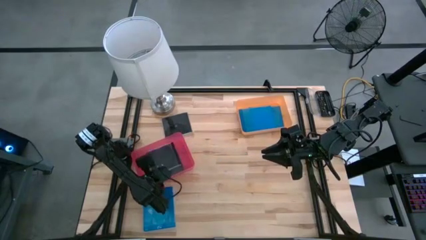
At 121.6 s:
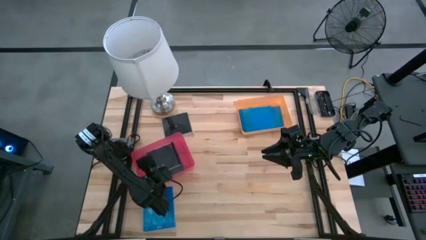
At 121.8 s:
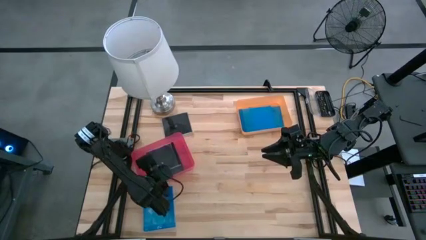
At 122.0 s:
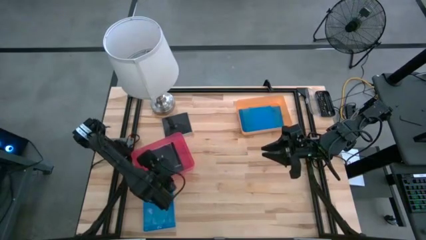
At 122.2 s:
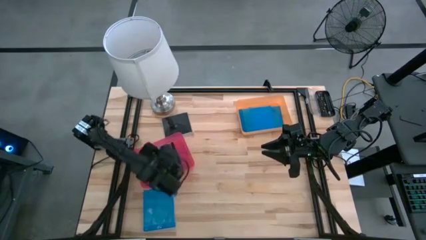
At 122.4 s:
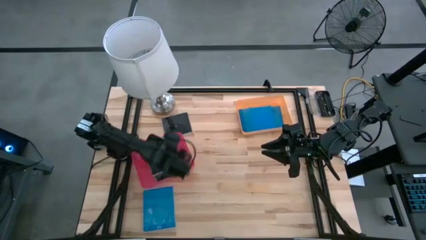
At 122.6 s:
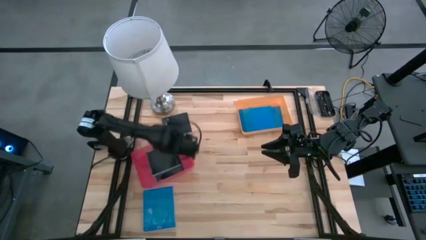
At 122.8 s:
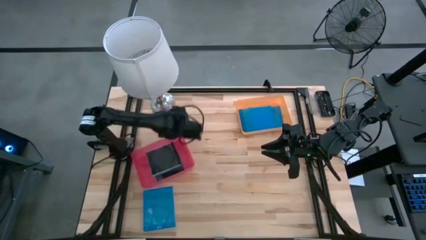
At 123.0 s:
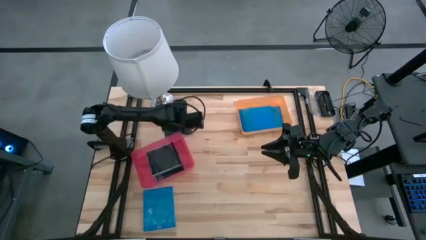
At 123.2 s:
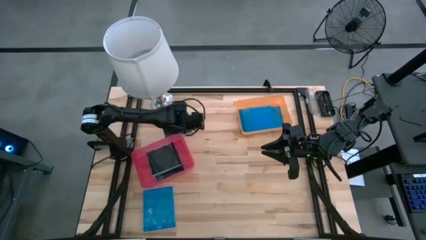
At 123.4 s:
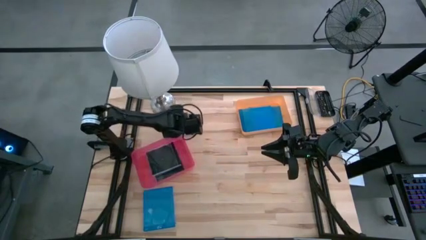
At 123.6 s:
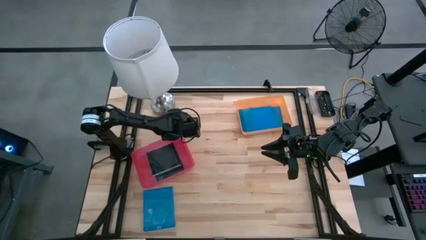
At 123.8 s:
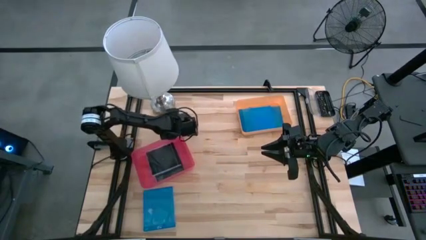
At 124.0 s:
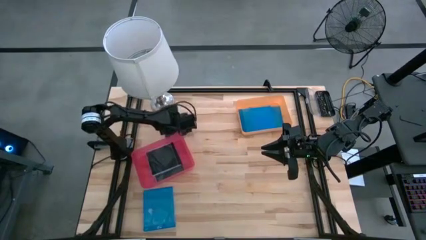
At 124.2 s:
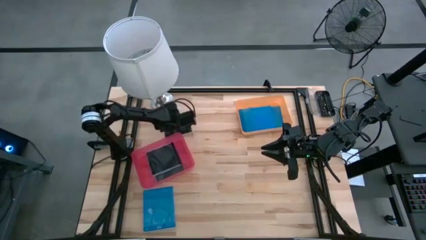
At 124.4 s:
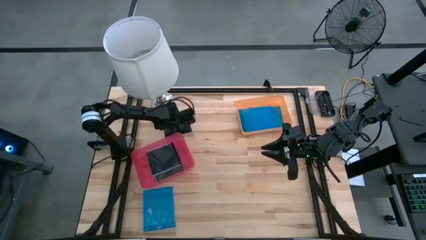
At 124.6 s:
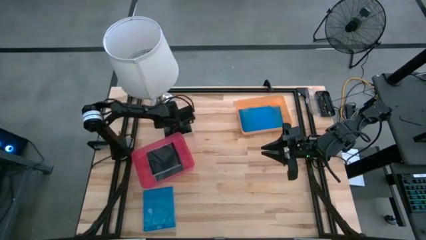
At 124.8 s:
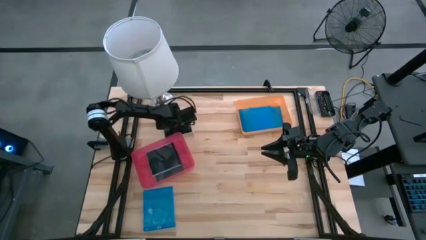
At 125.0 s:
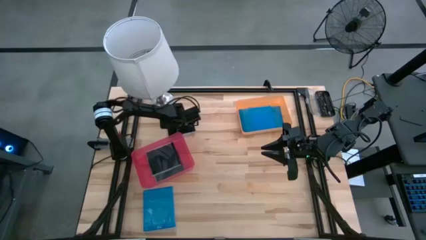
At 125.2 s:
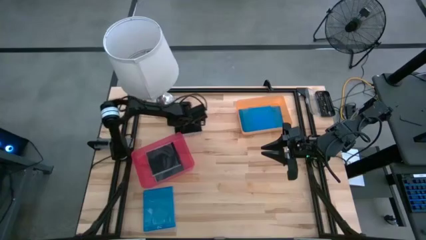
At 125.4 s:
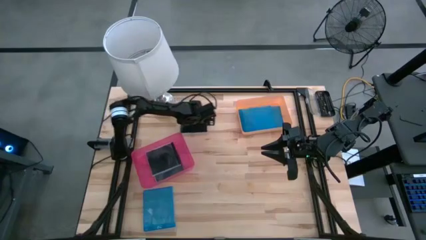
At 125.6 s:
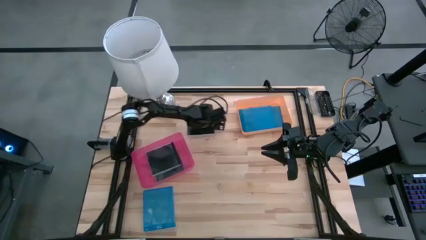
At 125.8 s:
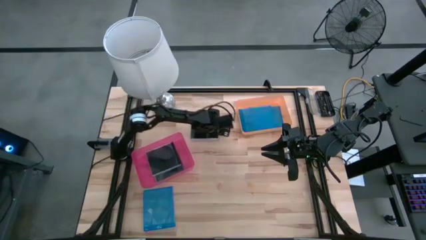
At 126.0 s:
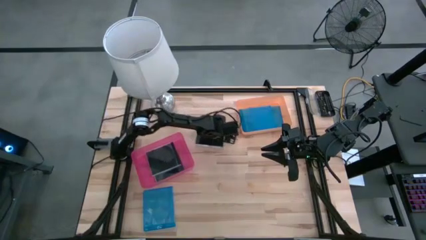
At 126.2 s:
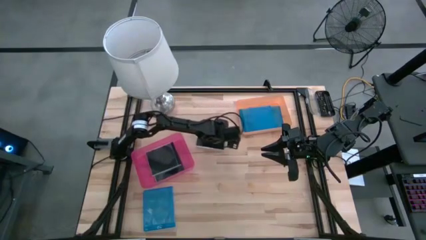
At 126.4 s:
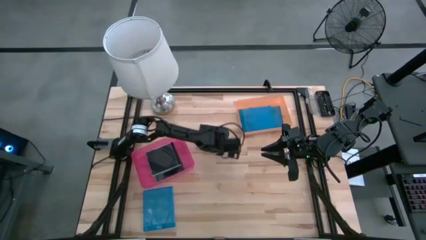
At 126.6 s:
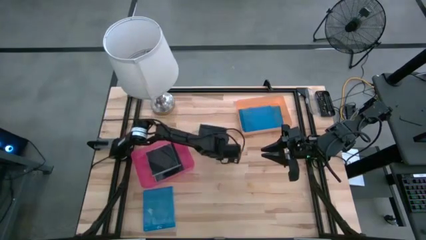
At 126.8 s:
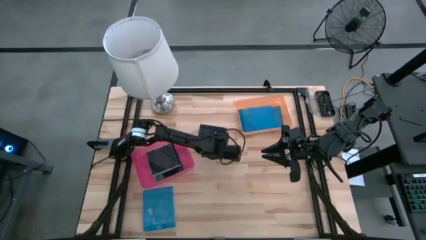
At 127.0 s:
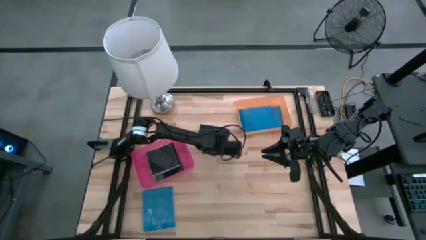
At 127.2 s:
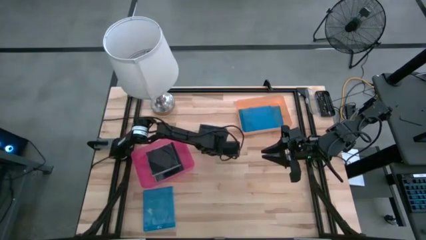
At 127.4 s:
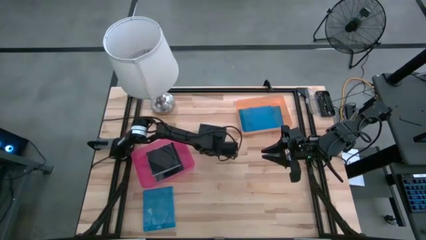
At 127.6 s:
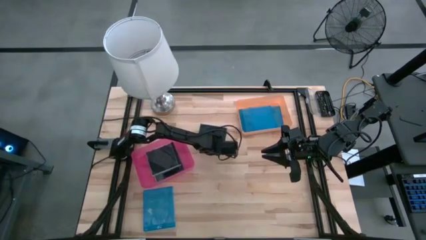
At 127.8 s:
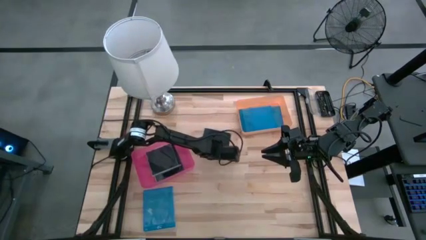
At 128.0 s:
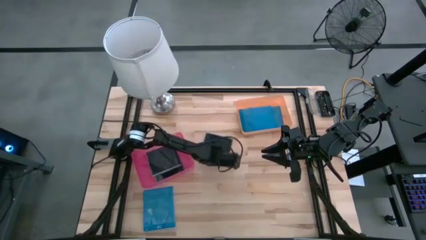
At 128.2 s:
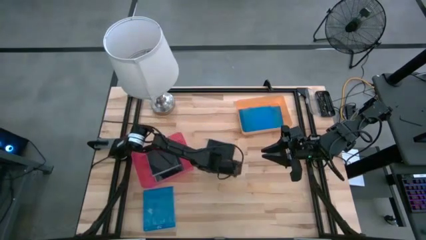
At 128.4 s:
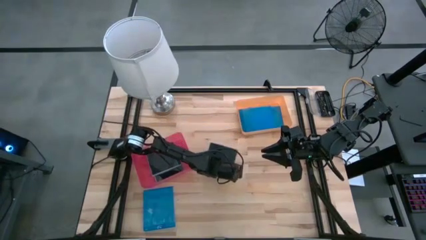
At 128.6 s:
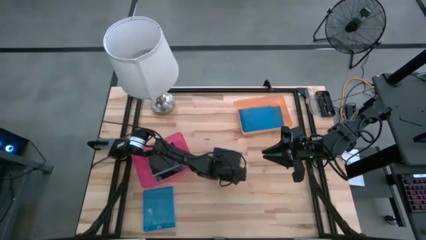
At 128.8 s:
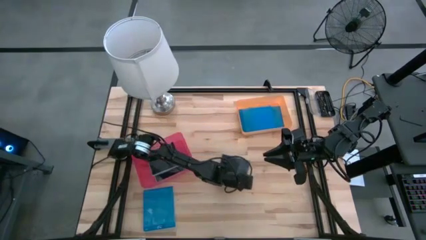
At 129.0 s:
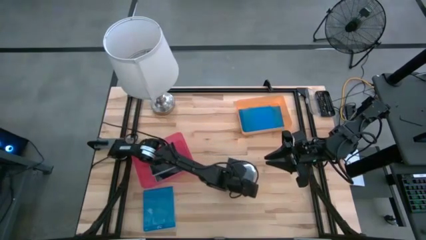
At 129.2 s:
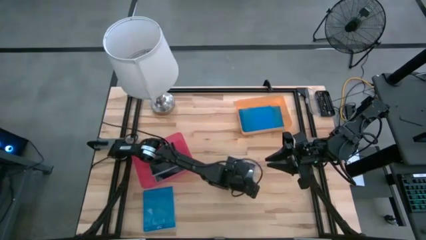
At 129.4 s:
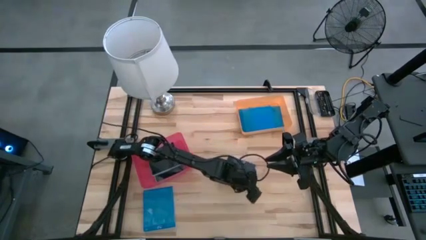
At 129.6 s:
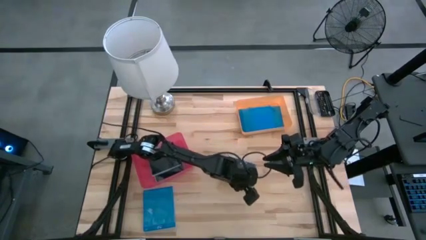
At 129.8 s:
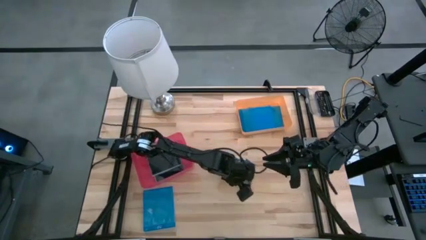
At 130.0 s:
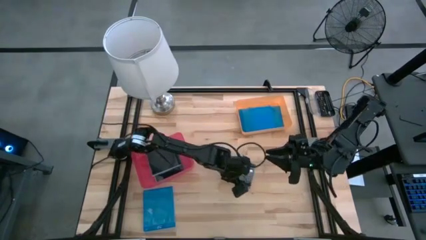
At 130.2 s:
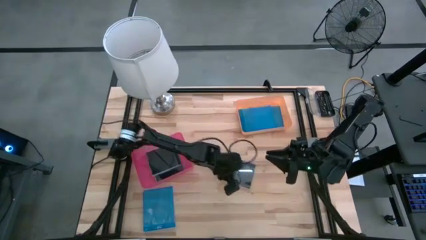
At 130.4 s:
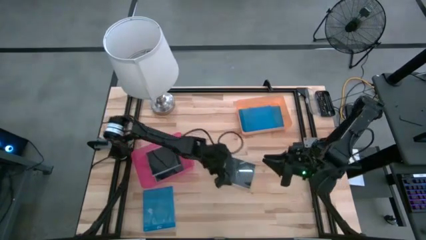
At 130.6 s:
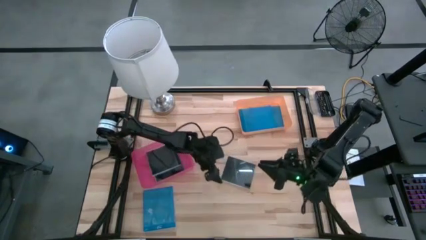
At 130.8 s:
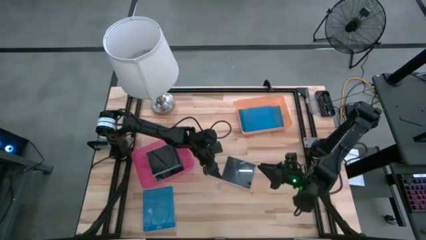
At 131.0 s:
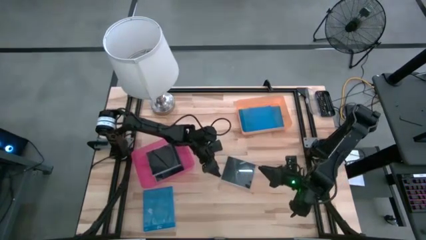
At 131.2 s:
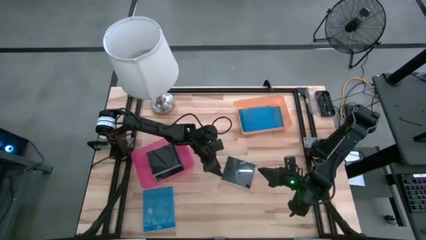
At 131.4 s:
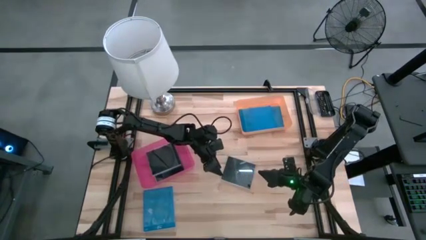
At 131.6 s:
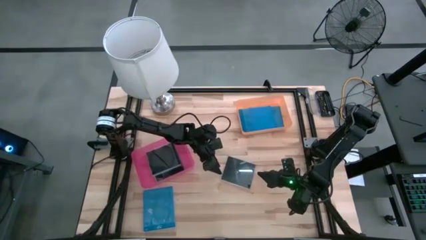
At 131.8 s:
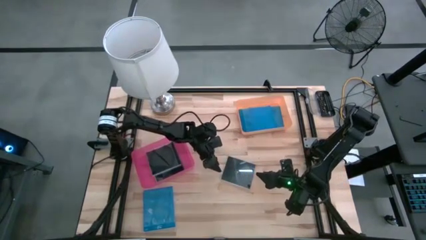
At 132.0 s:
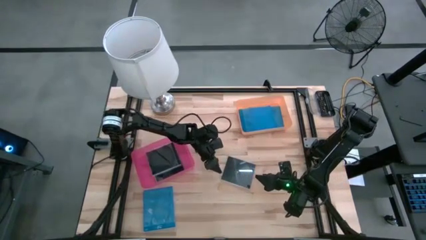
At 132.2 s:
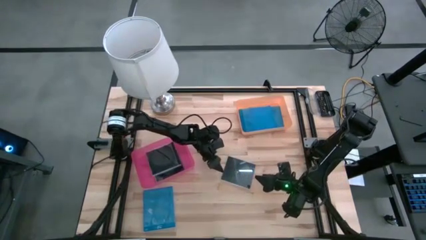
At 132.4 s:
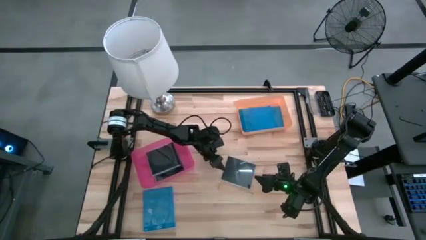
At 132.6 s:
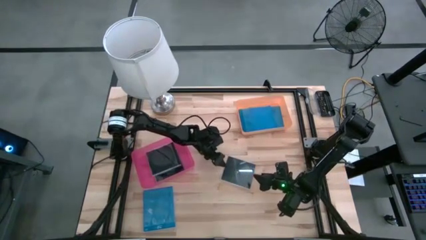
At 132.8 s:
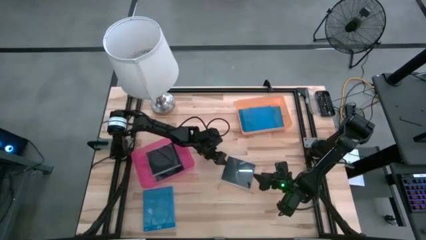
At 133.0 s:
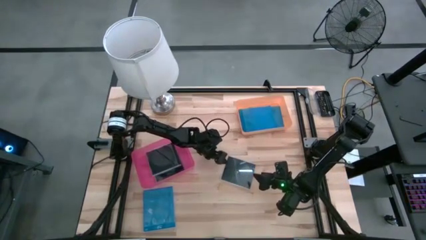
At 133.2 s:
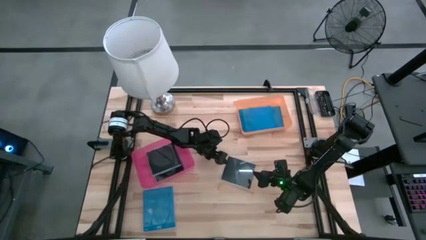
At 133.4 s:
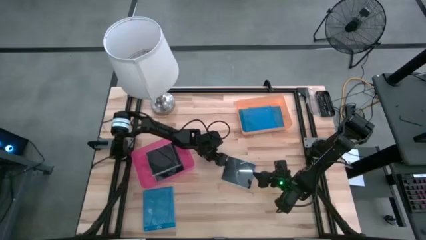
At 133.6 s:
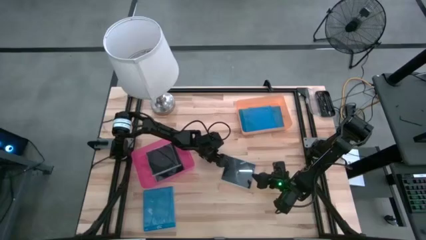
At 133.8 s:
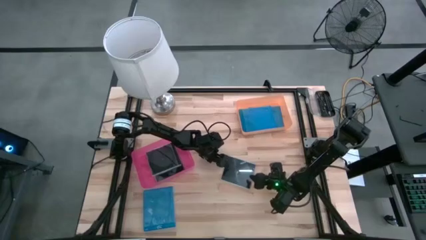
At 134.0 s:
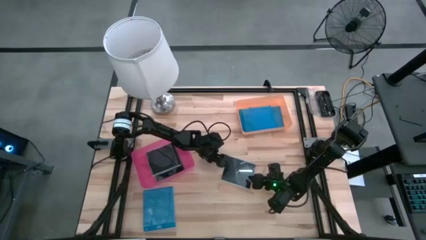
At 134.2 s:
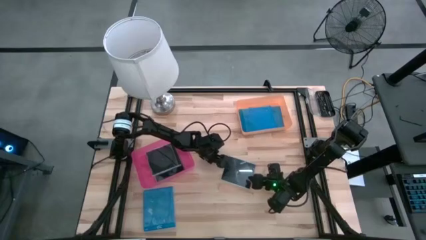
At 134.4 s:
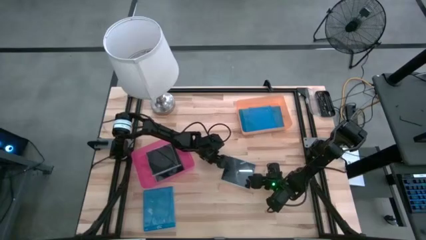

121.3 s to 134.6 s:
Task: Pick & place jewel cases by type
Put the black CD case into the pink bin
